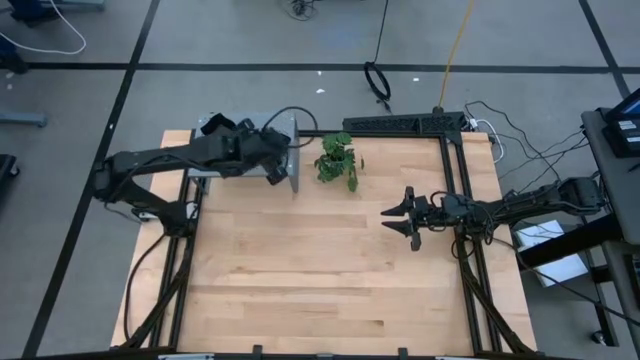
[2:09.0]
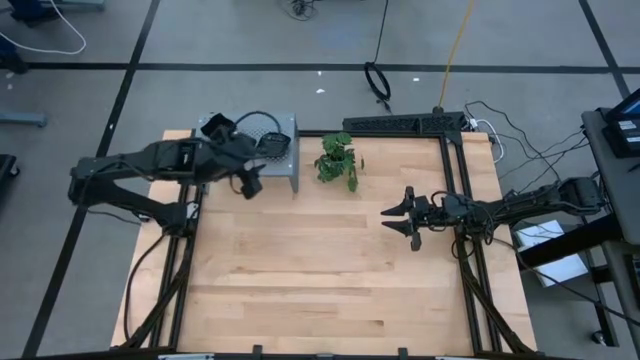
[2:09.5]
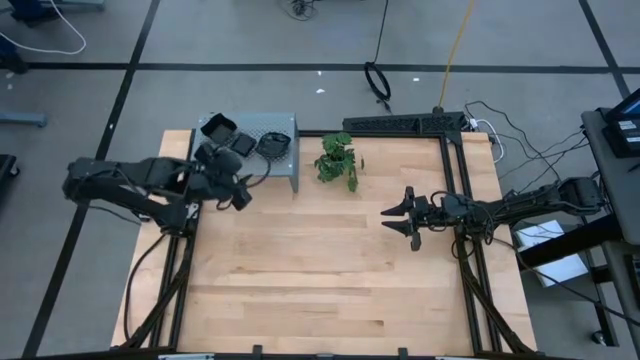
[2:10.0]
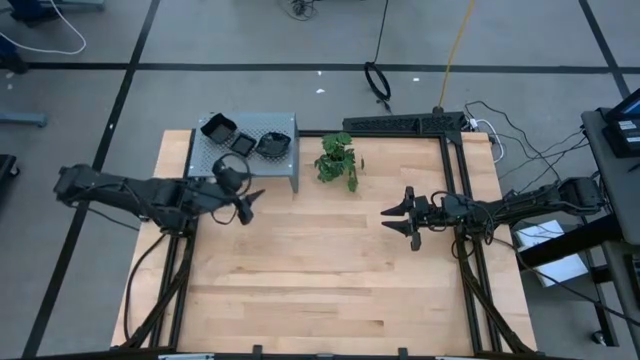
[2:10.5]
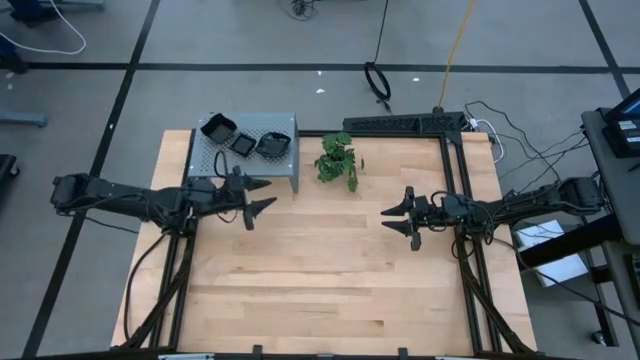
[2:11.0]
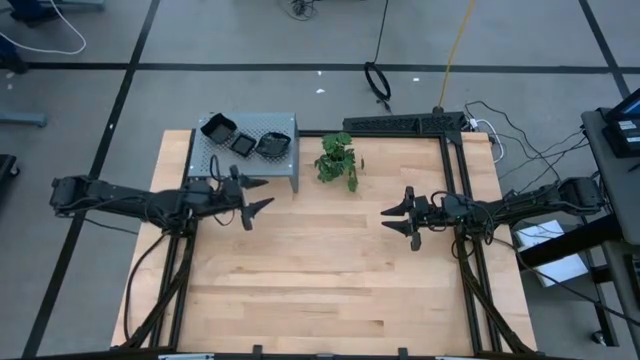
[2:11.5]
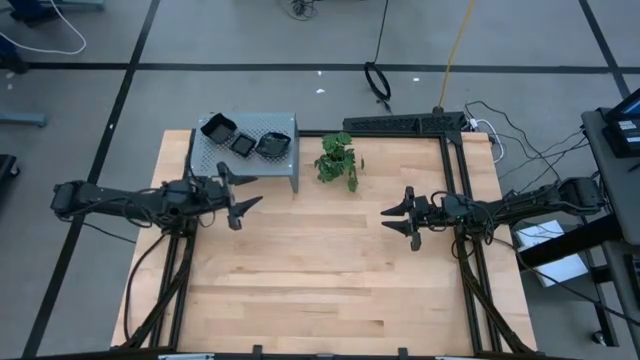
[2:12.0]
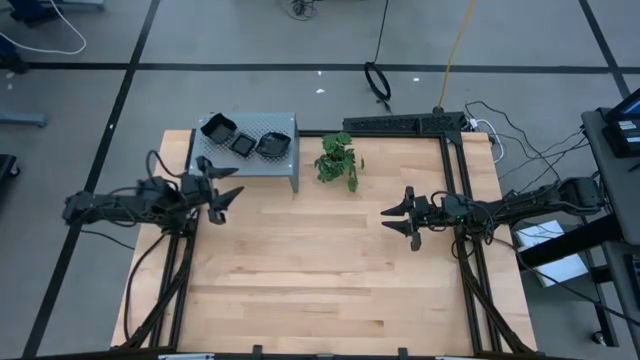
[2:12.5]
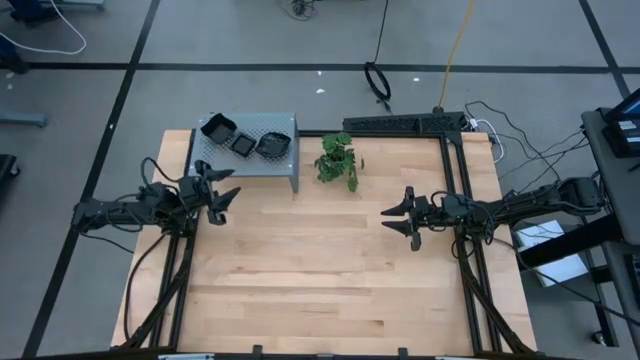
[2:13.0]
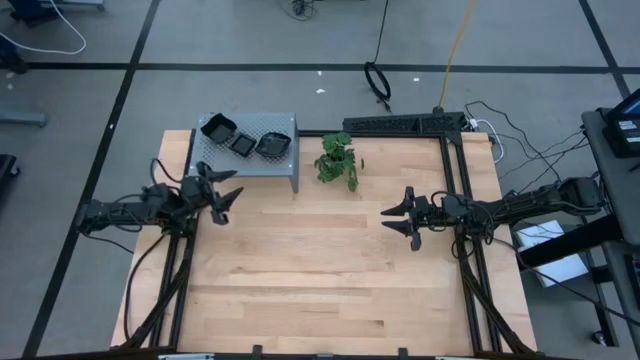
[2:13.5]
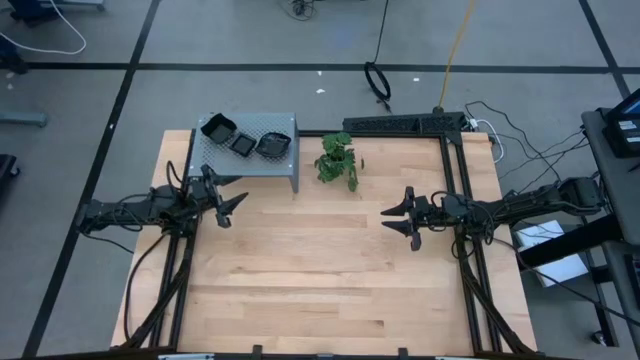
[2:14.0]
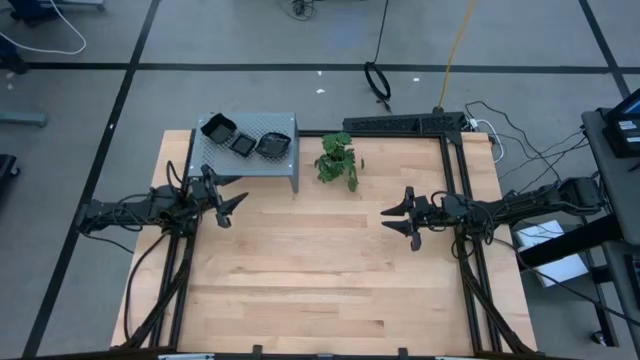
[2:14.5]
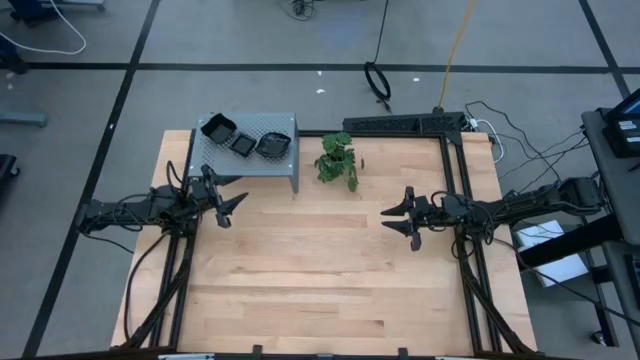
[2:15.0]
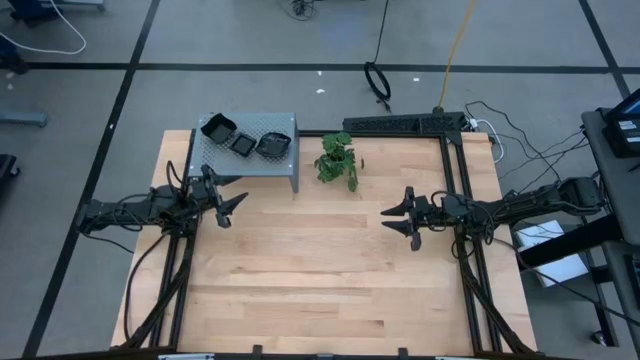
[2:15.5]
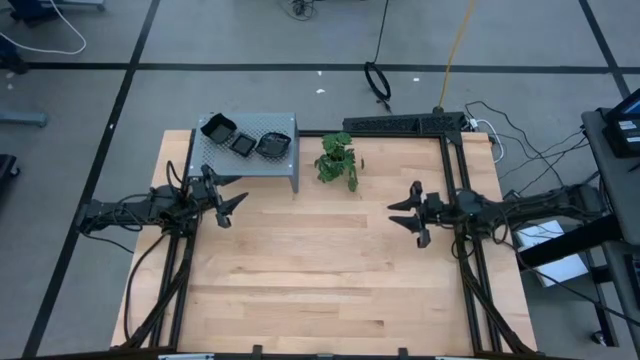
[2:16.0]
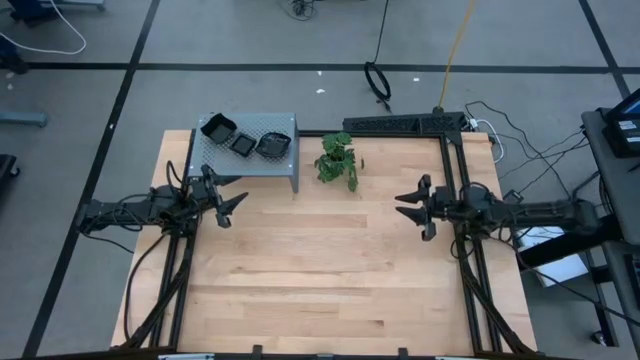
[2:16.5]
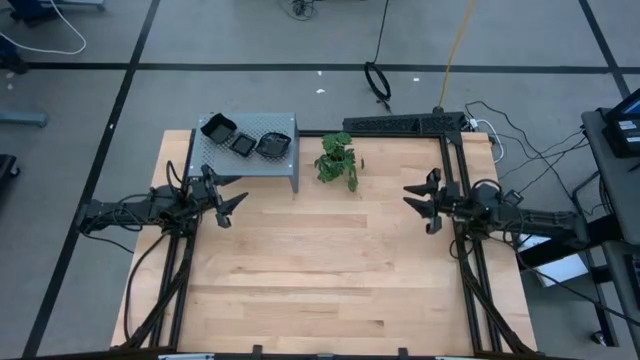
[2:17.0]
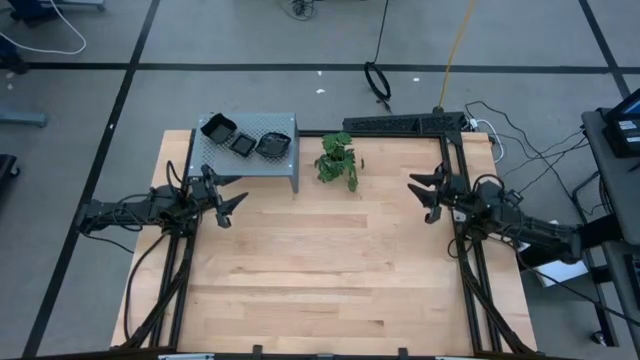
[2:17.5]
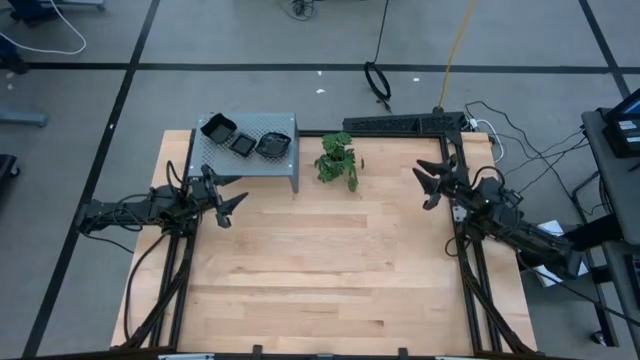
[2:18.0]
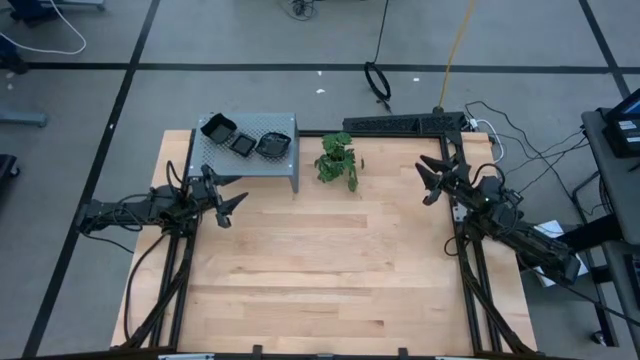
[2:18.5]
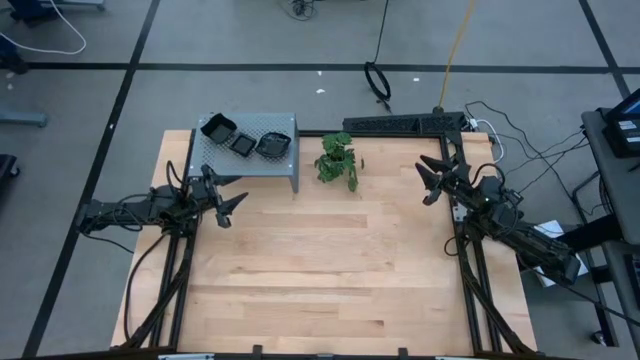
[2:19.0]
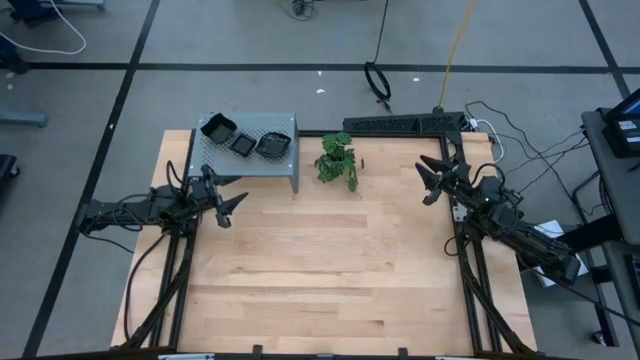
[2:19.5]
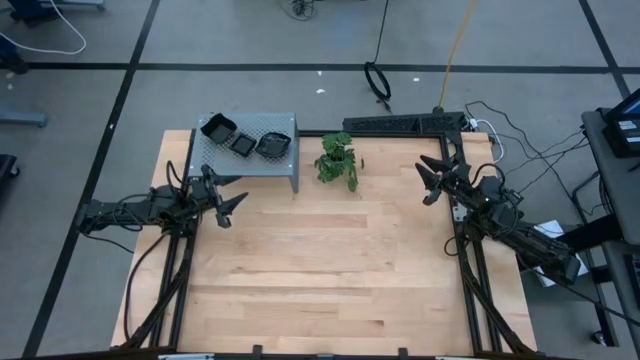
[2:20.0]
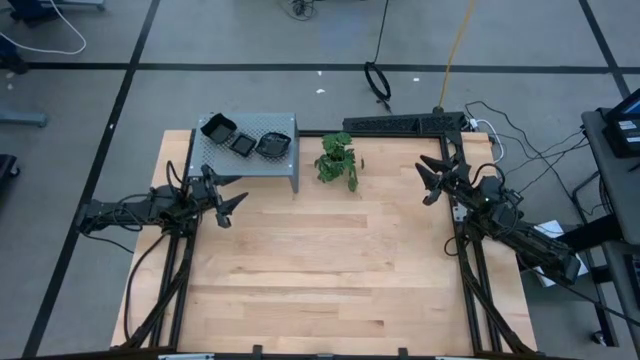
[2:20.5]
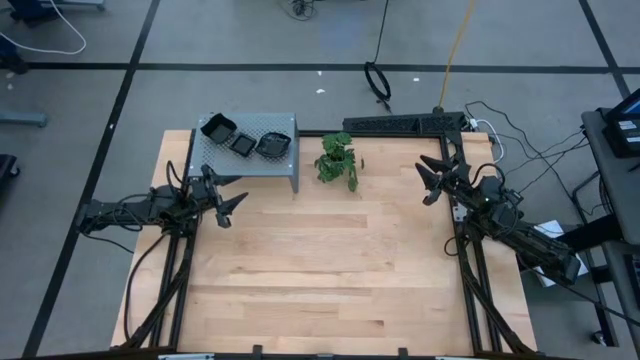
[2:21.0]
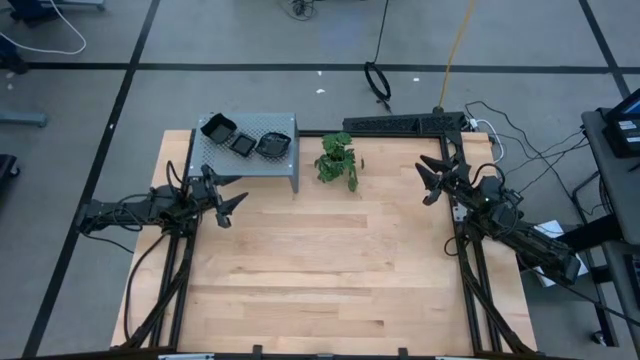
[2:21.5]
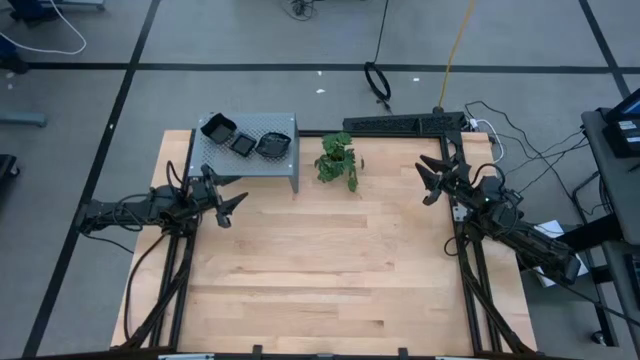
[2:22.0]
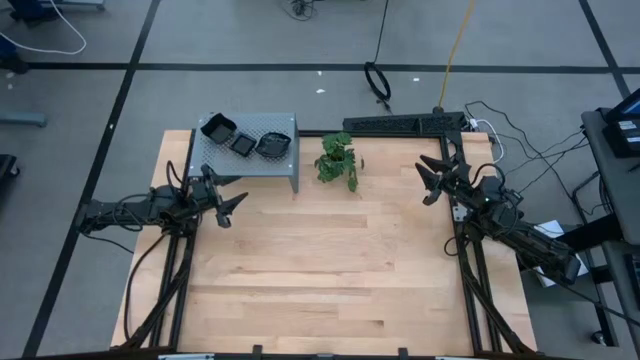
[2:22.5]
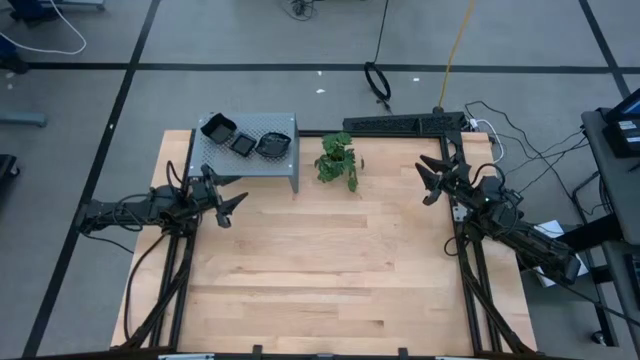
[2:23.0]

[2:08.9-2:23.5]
Task: Pick & Place Mini shaped plates
Return to Home Position

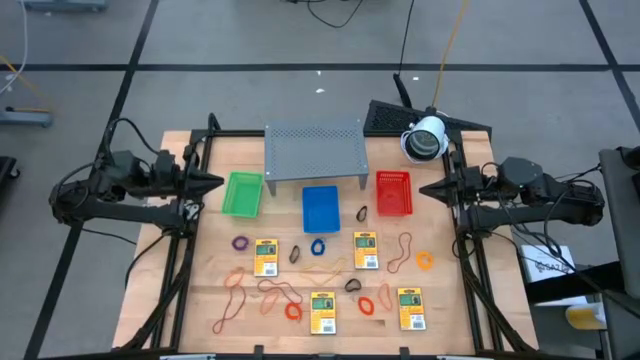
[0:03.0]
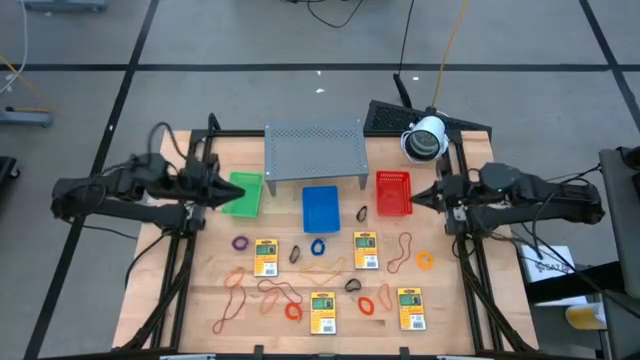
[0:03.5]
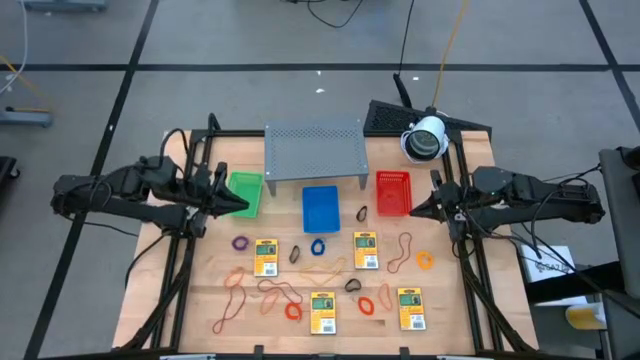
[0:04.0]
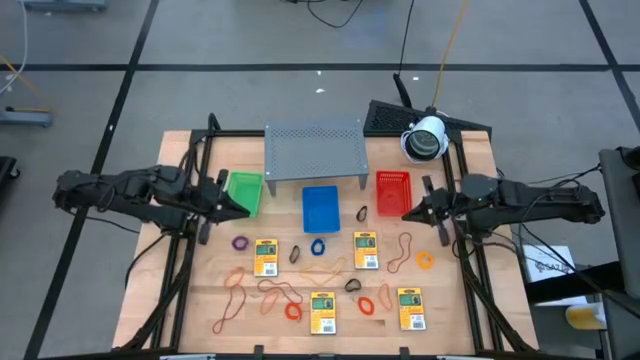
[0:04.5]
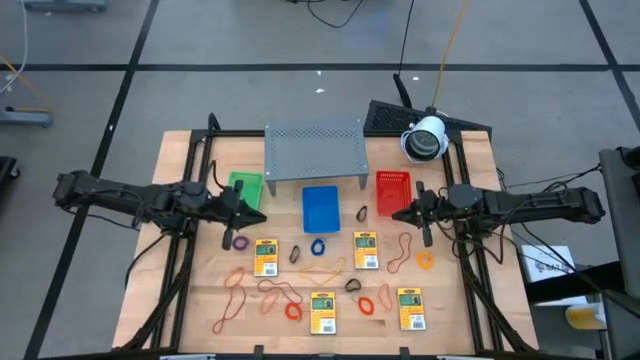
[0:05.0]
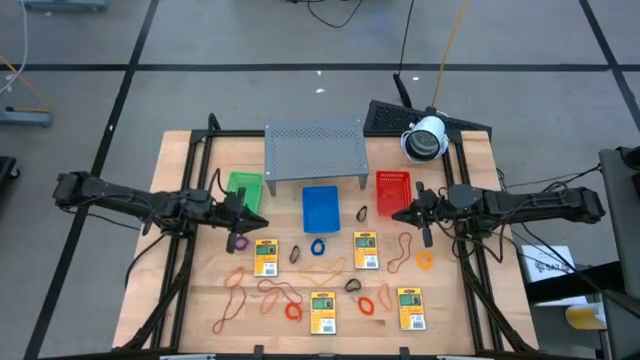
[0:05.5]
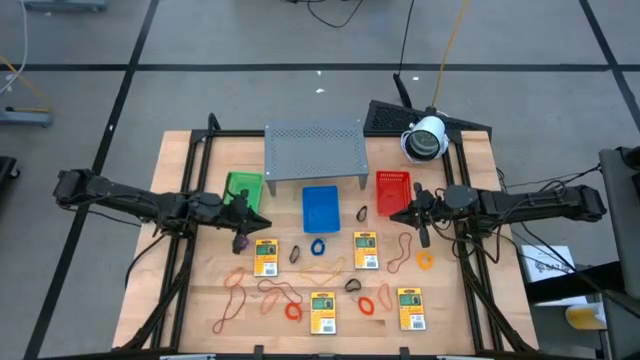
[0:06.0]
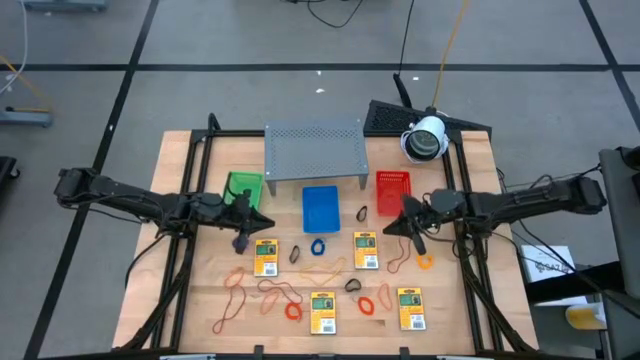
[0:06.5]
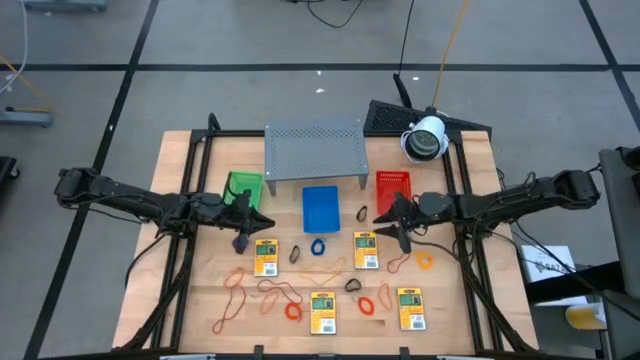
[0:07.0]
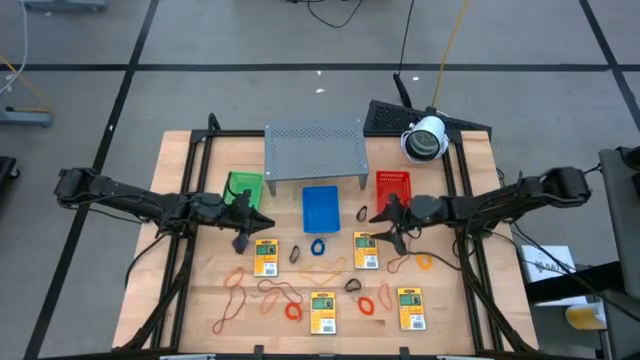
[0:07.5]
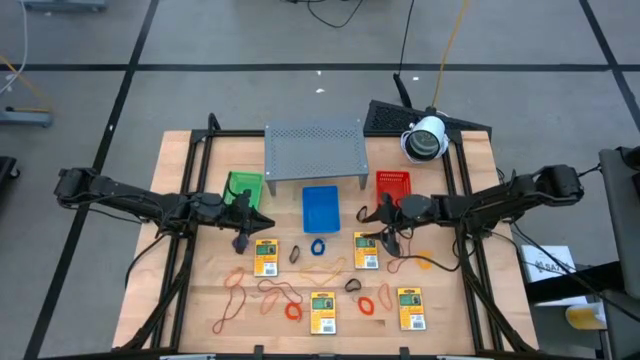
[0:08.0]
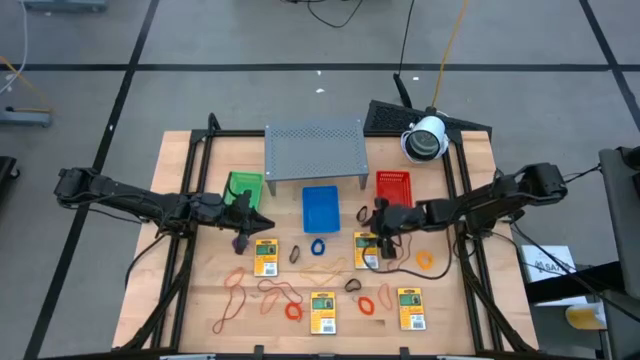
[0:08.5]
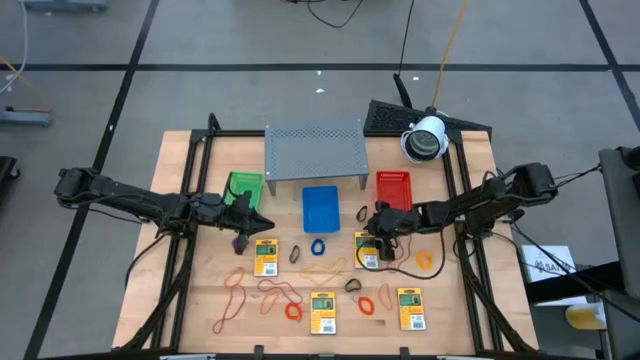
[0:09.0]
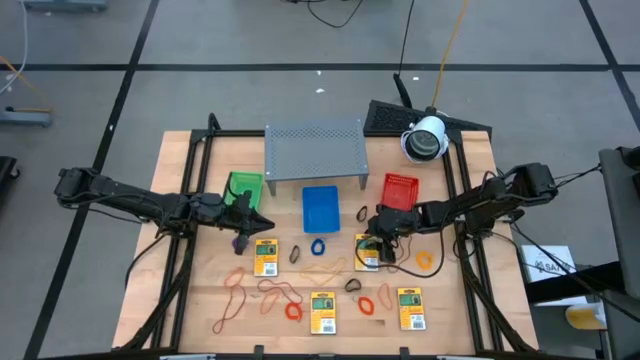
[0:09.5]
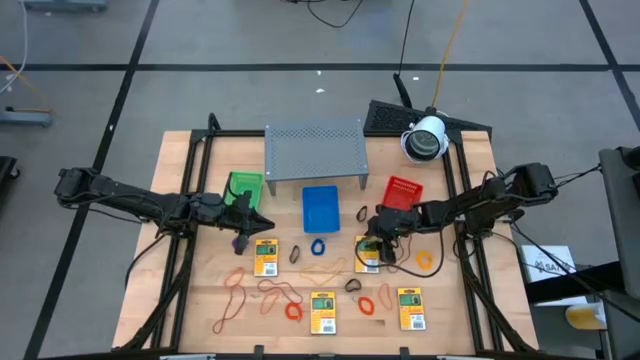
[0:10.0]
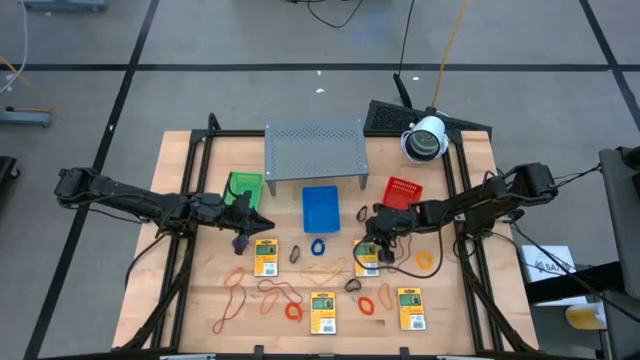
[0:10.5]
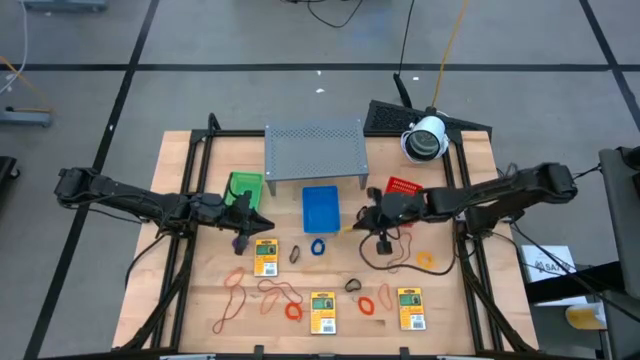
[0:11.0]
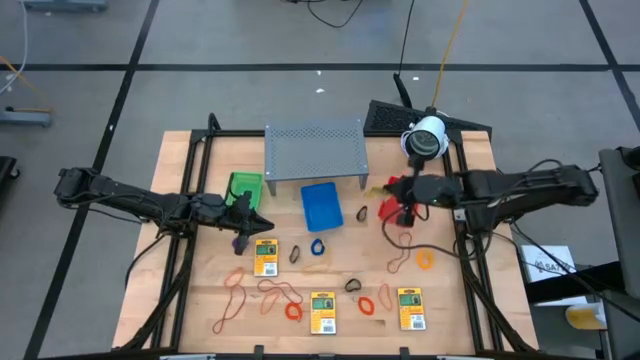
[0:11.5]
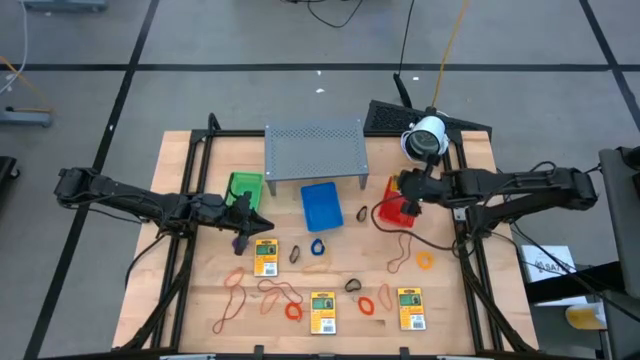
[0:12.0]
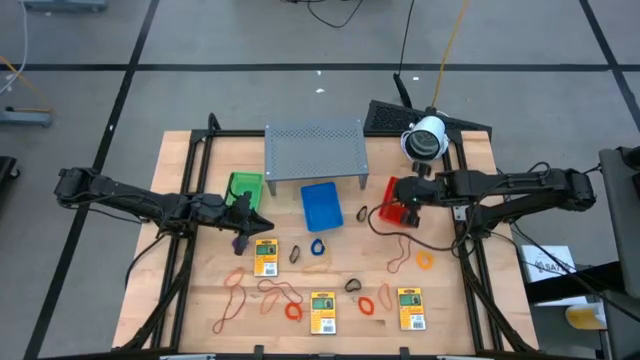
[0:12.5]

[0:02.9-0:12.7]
Task: Pick & Place Office Desk Supplies
Put the crayon pack into the orange bin
